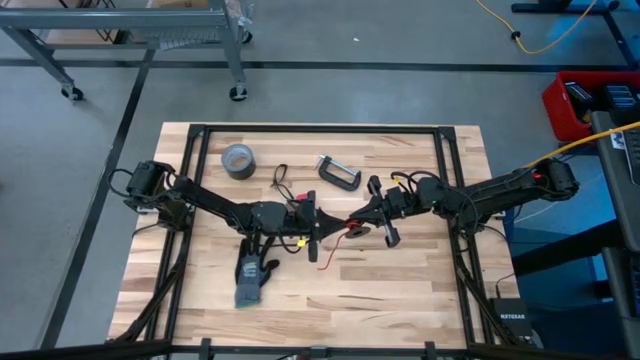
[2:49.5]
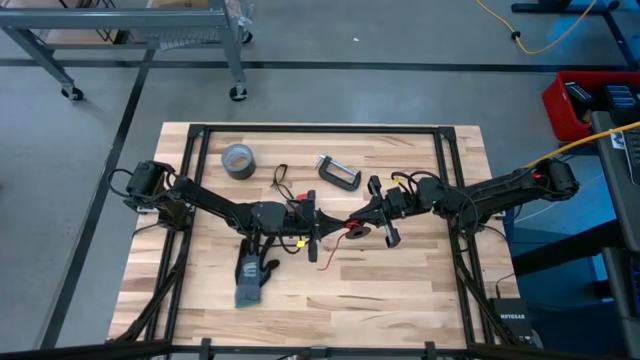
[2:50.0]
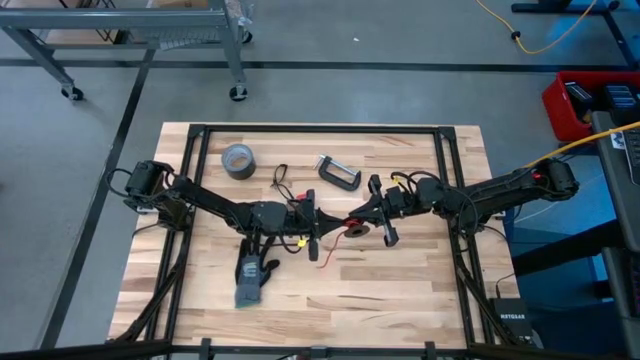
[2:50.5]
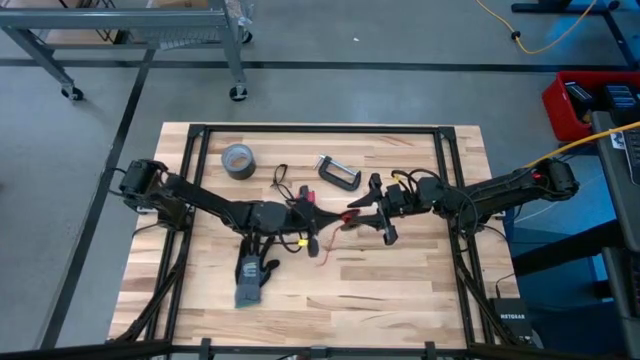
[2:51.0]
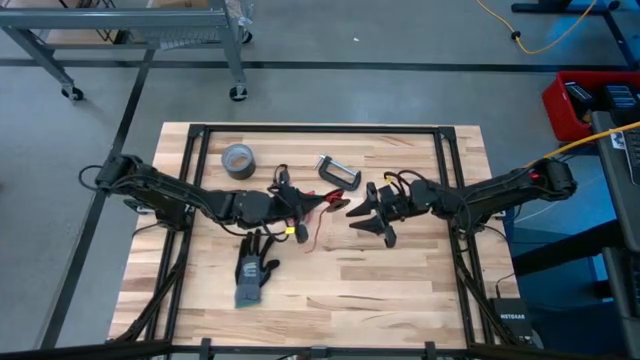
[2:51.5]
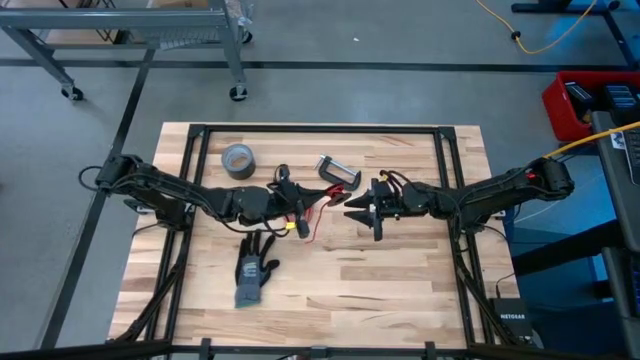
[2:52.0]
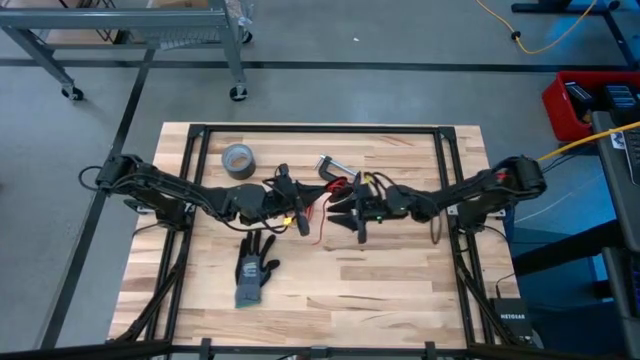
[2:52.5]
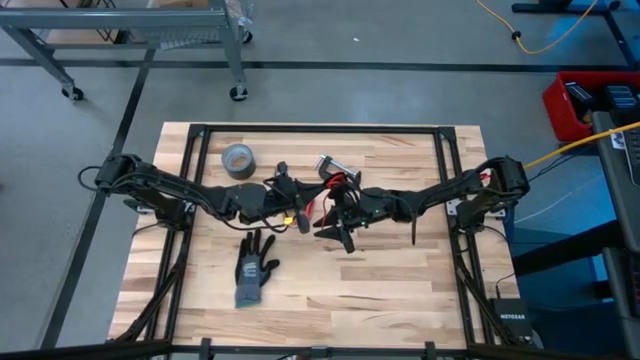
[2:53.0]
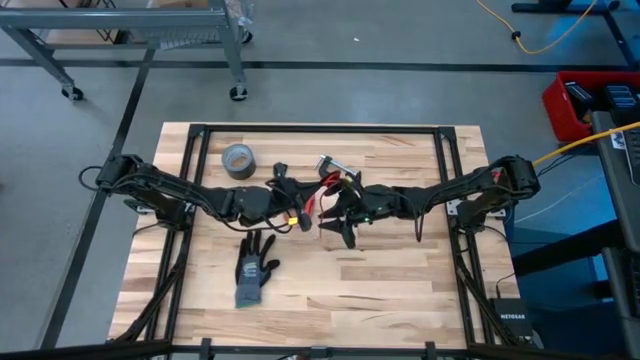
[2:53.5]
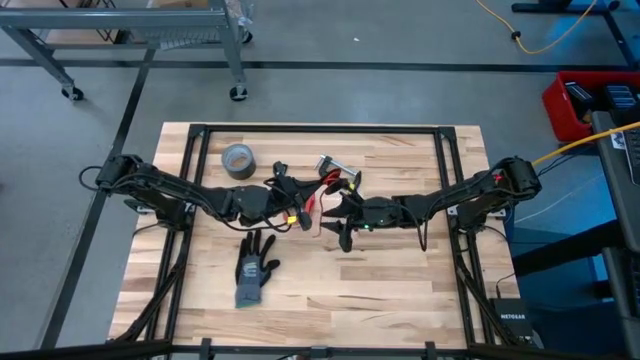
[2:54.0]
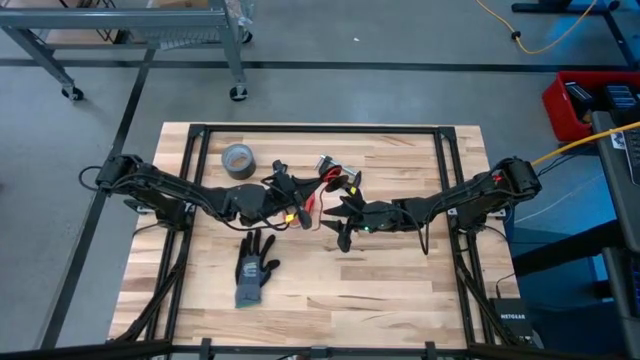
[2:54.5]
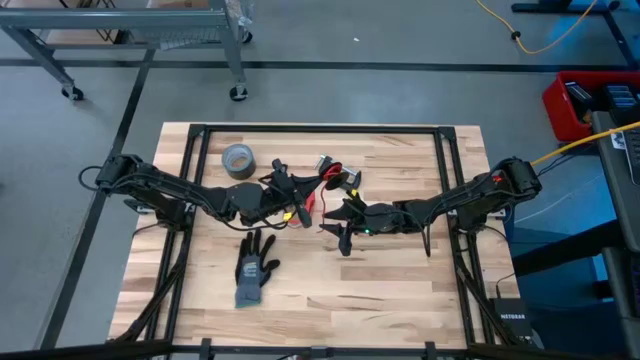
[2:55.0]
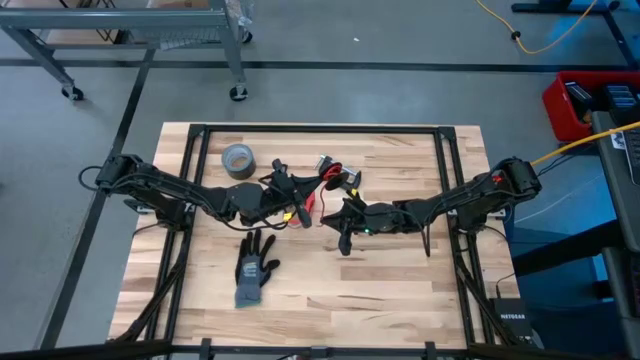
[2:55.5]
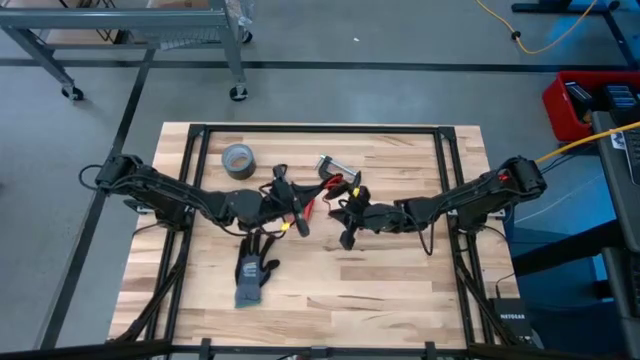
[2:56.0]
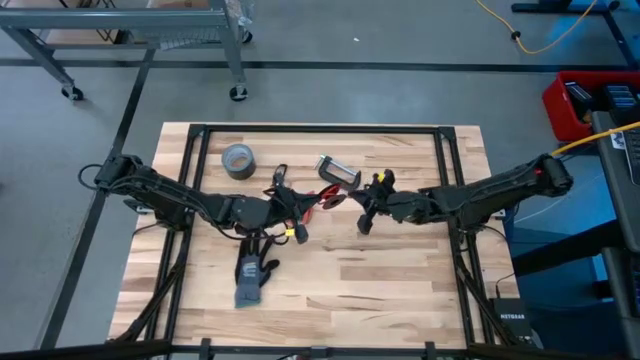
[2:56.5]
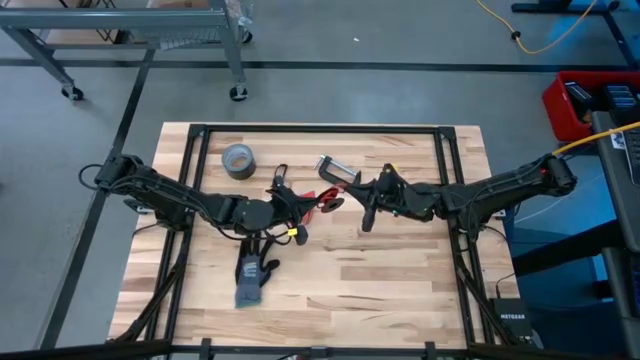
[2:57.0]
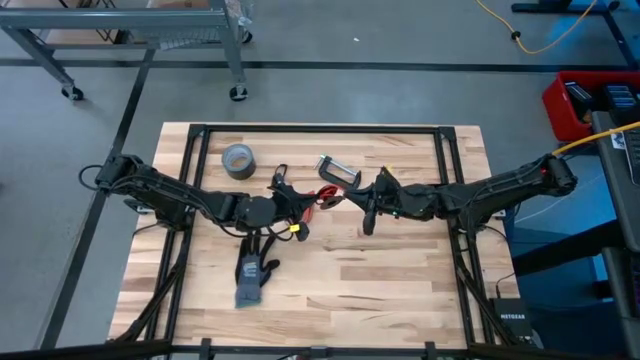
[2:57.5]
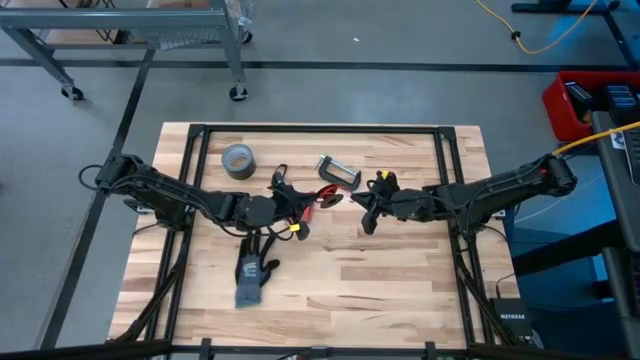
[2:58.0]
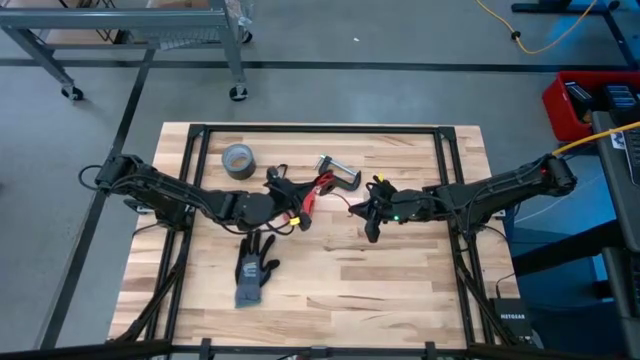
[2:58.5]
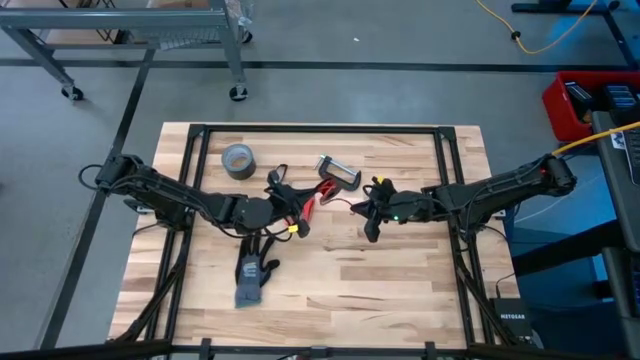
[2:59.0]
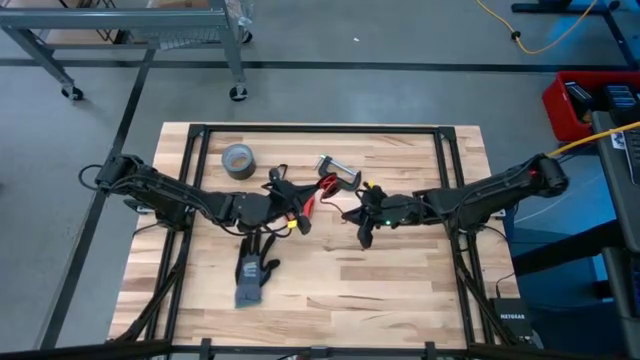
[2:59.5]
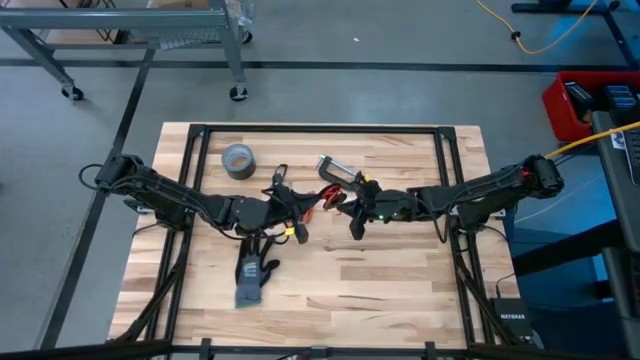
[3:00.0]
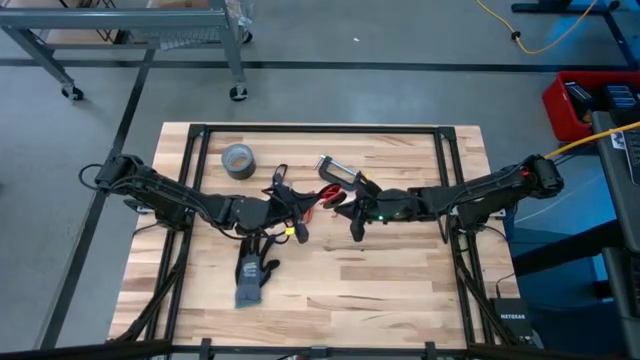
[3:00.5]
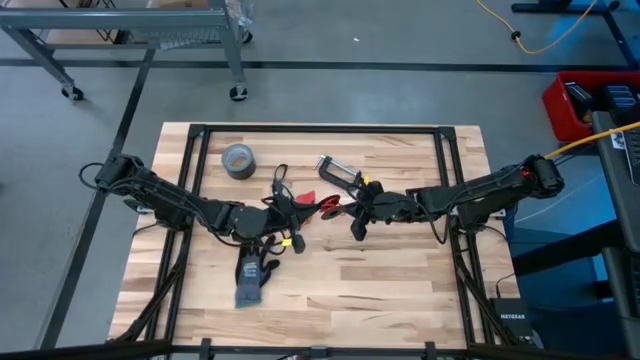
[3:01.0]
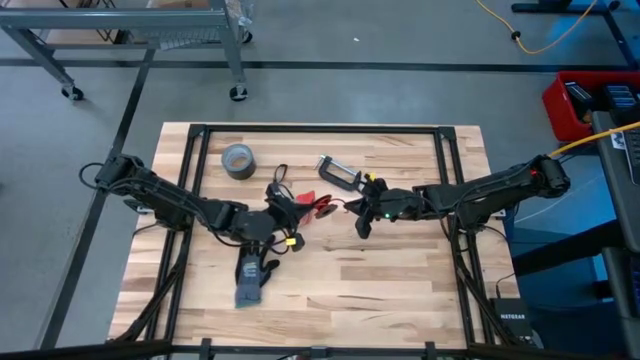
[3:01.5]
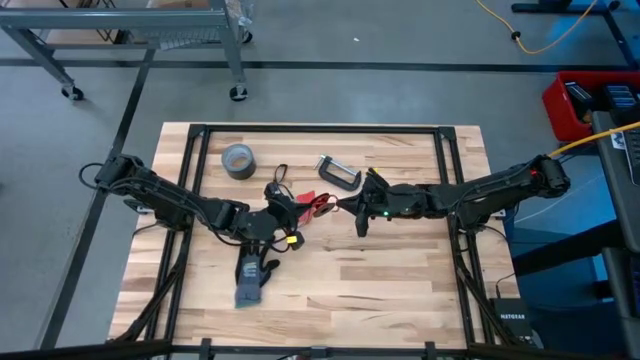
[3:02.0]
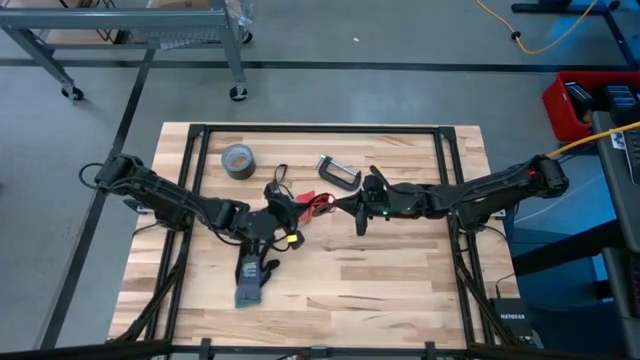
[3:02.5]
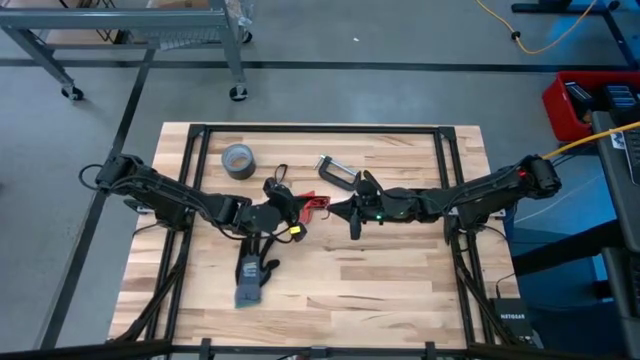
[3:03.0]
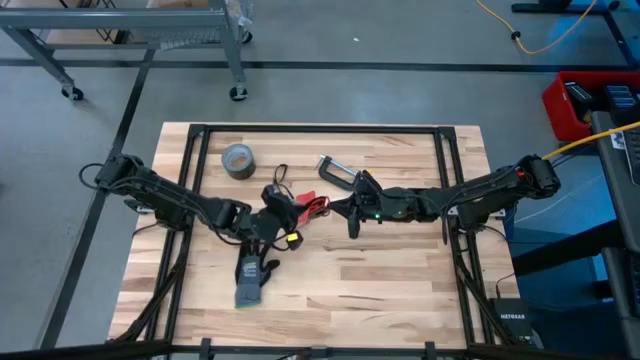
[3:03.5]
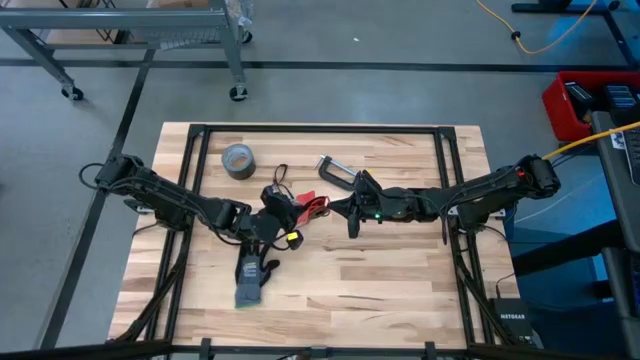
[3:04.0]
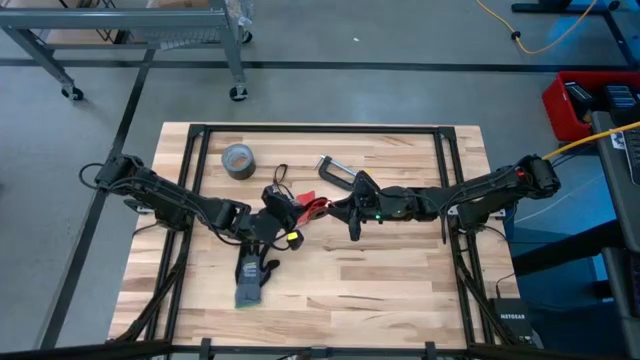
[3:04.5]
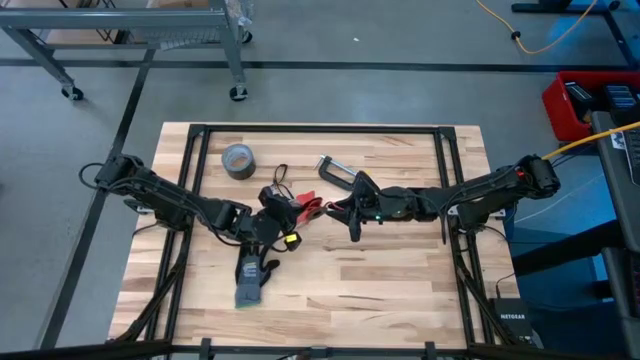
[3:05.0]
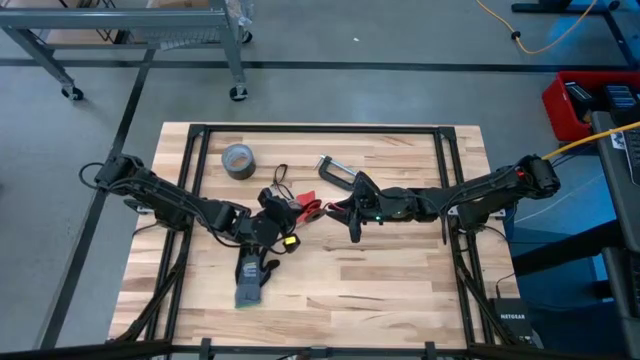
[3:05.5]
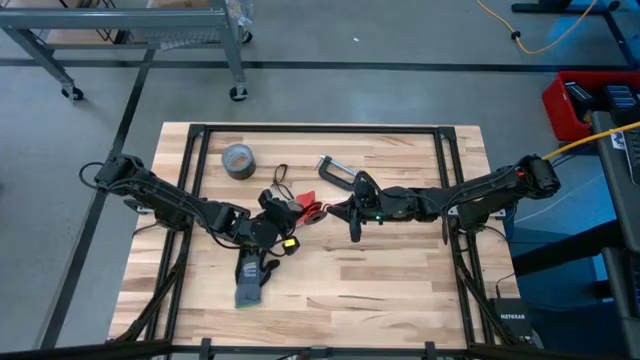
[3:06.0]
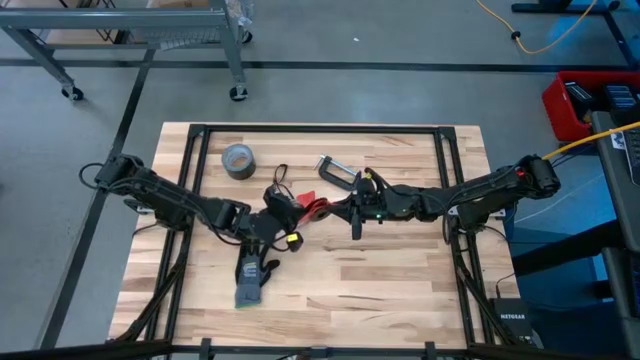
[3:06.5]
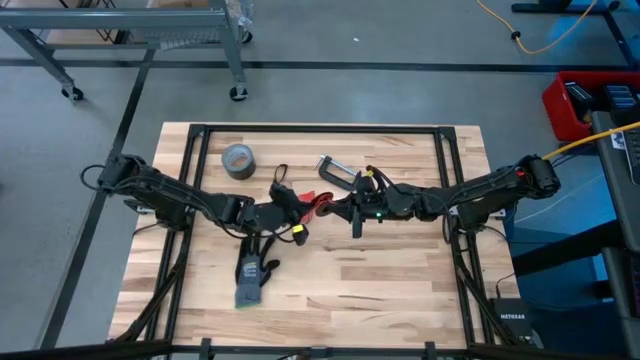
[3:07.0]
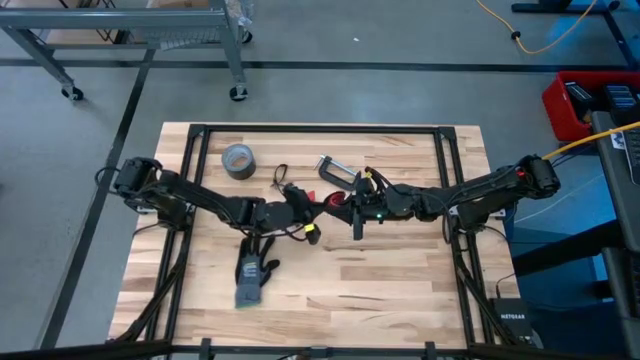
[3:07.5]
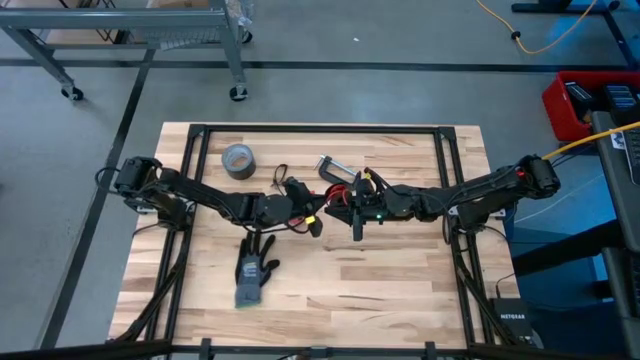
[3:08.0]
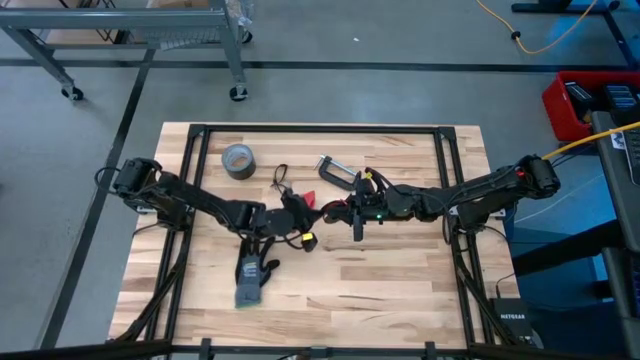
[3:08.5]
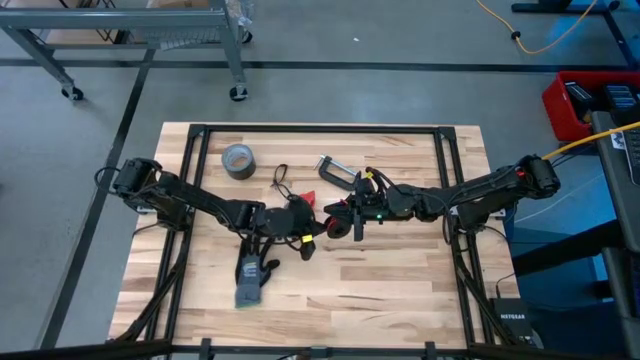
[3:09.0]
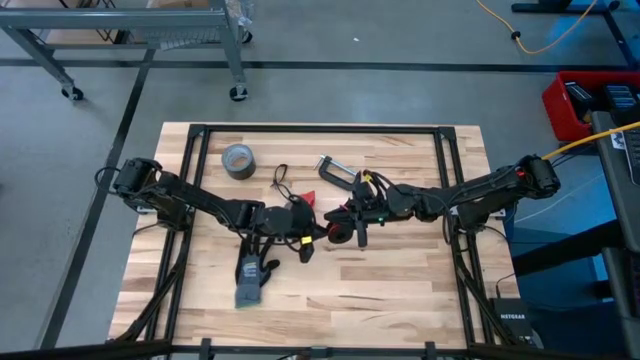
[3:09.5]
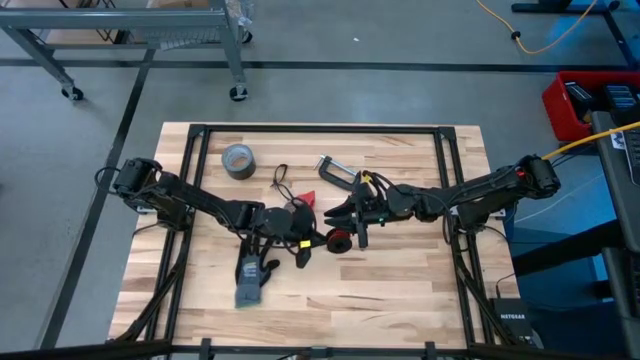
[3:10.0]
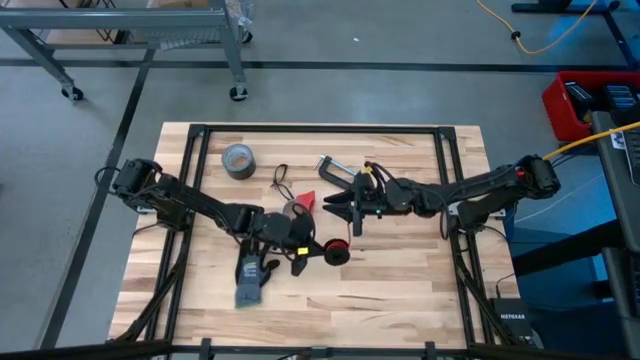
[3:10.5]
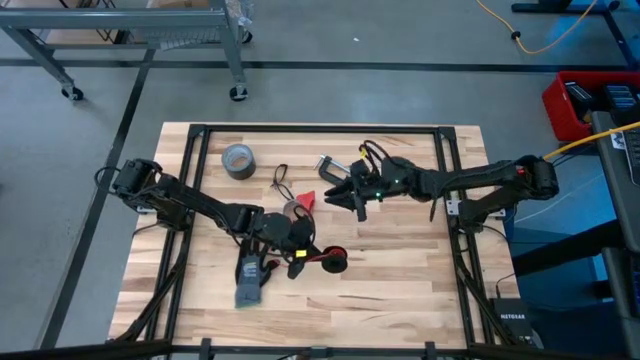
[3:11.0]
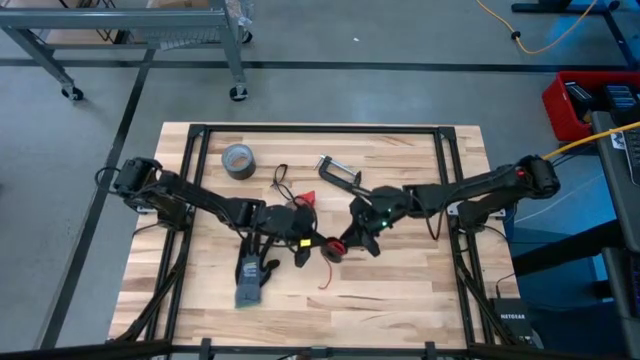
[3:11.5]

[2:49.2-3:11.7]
Task: Coil cords
Coil the red wire onto the spool
